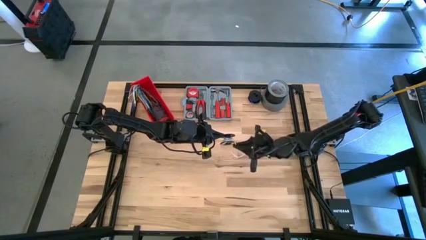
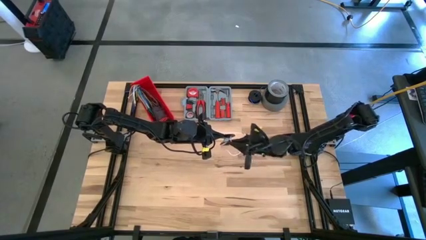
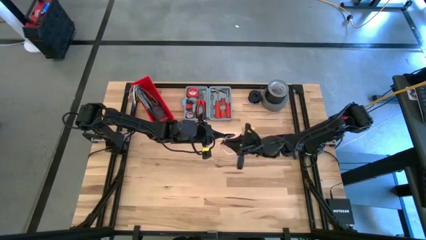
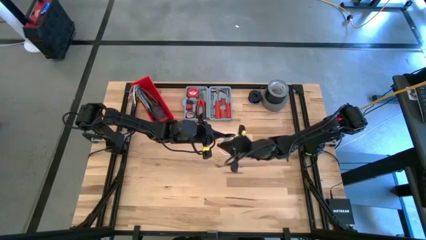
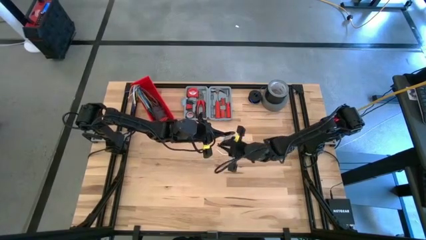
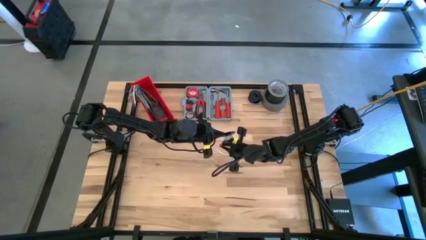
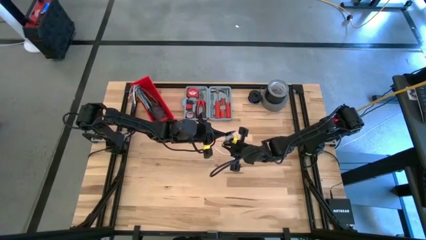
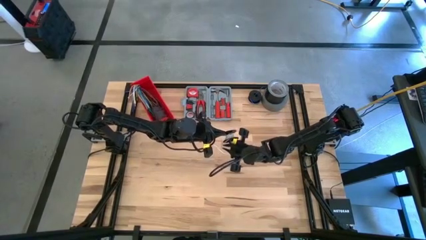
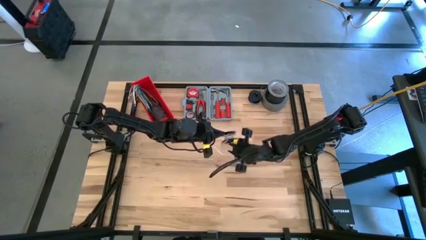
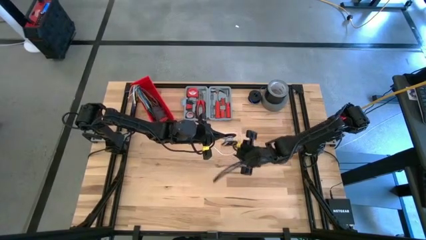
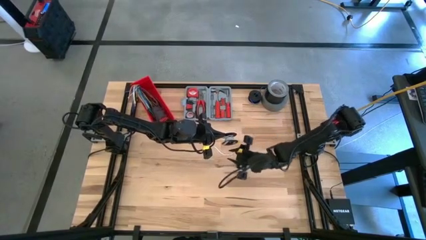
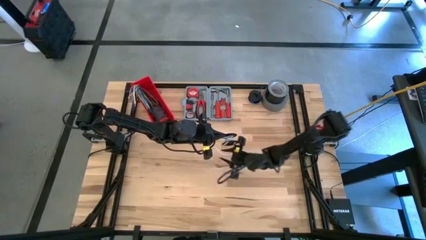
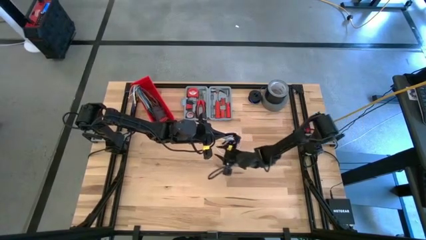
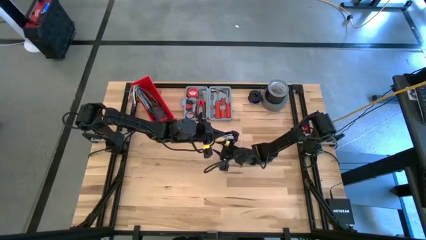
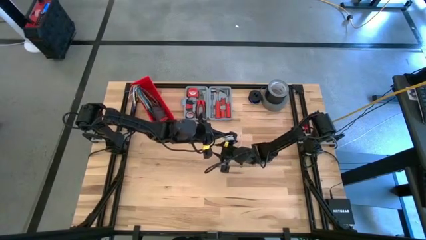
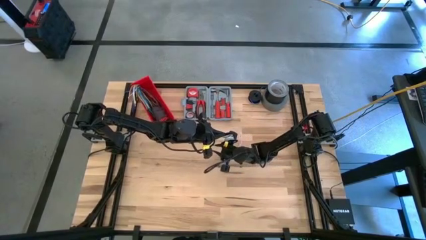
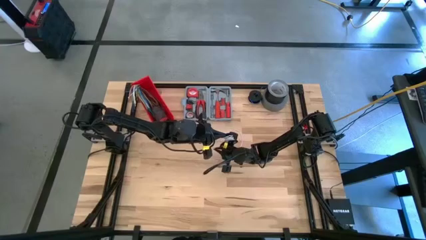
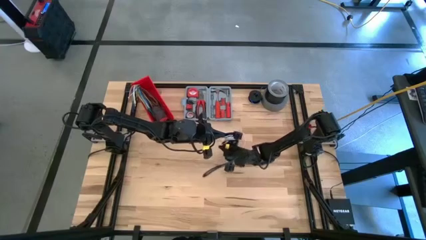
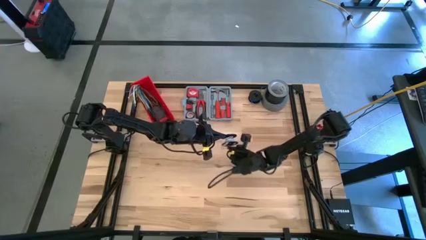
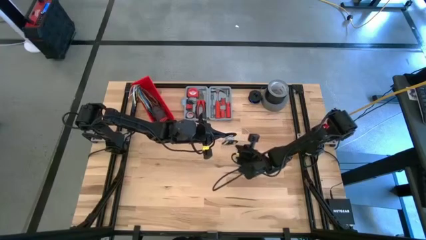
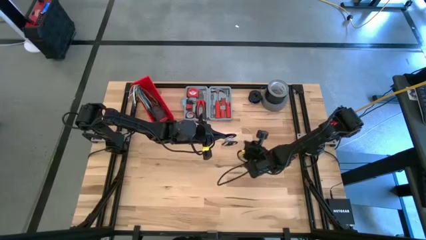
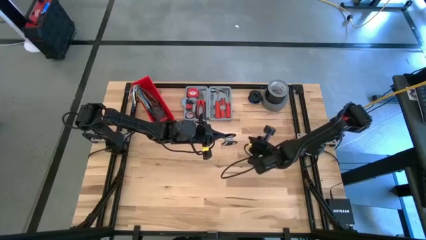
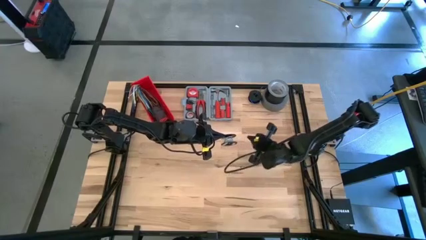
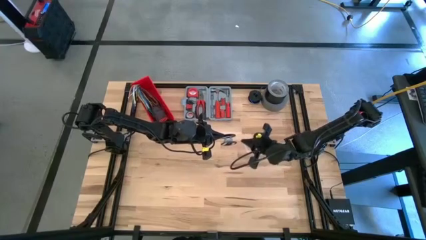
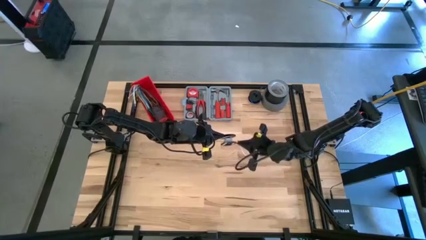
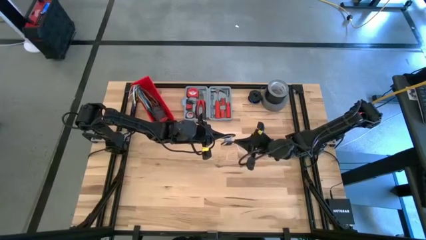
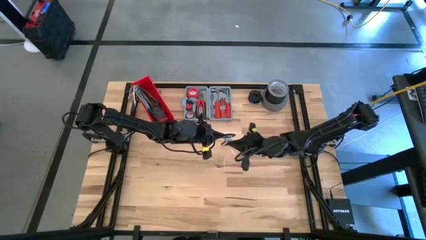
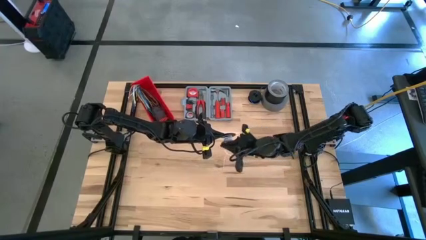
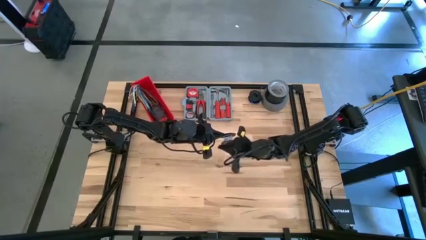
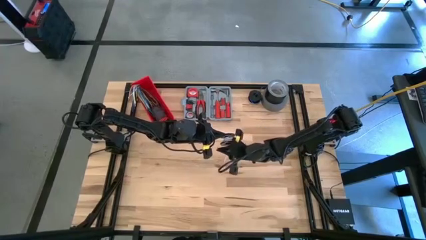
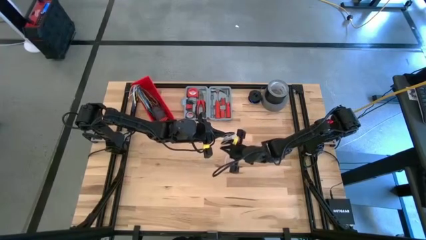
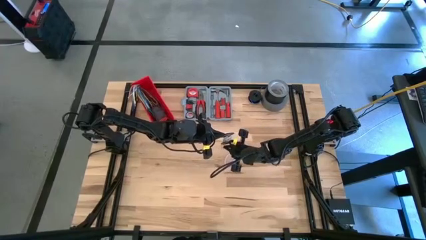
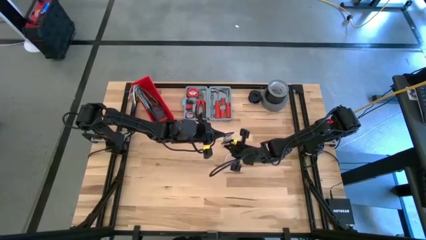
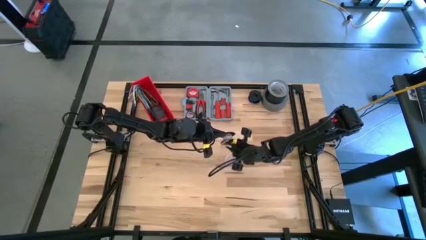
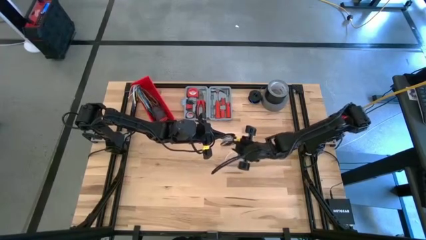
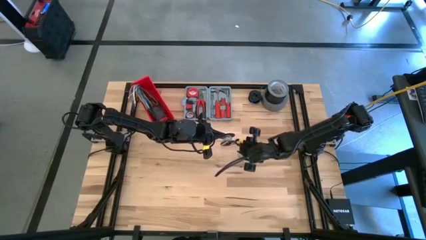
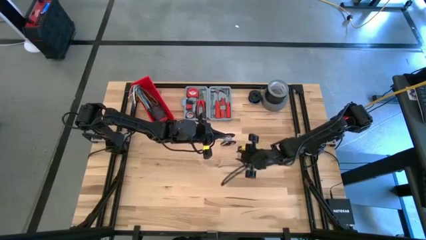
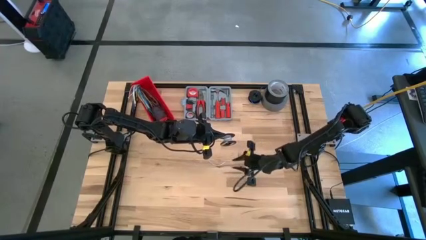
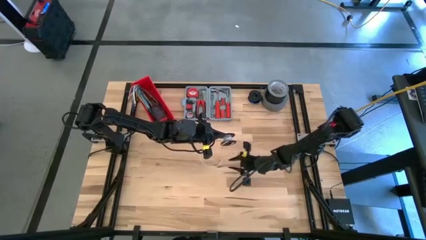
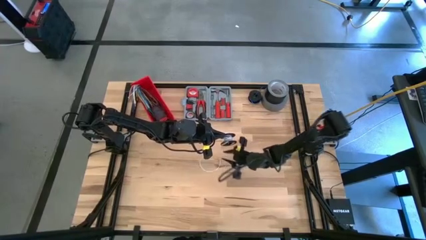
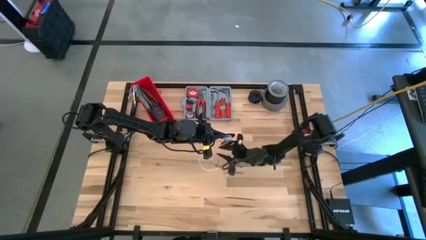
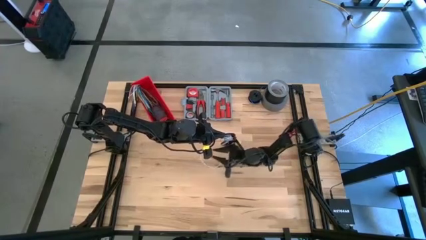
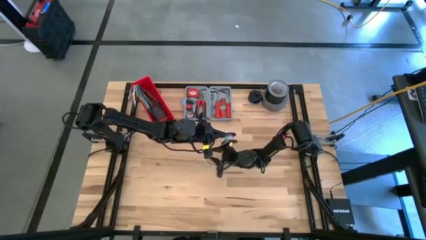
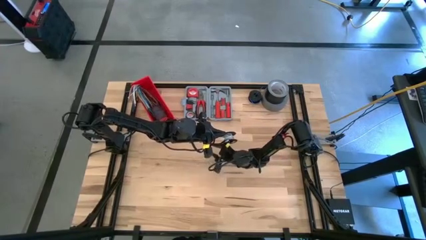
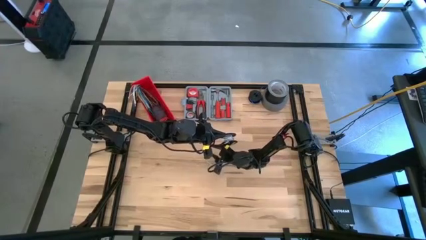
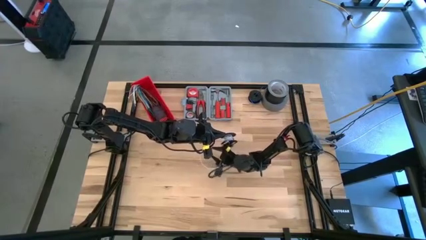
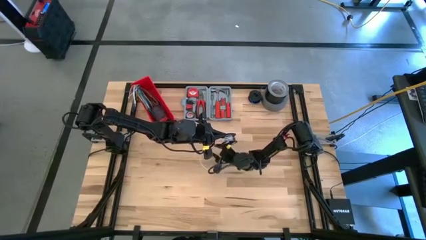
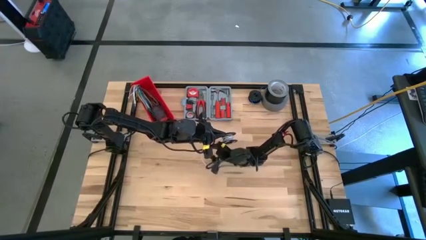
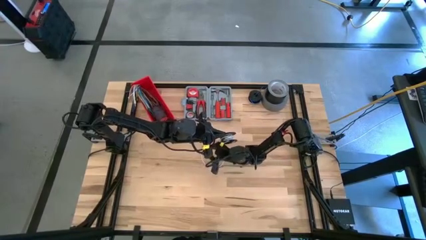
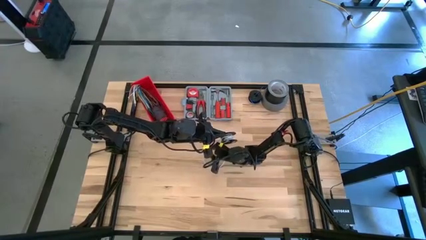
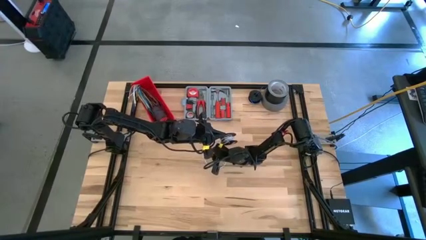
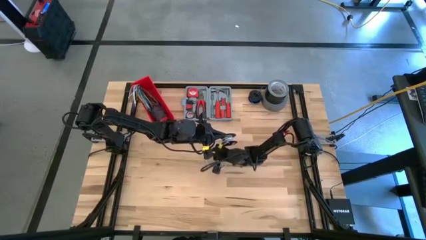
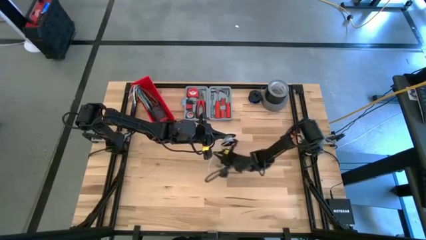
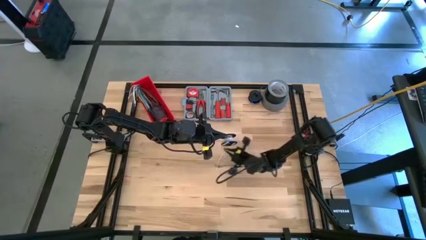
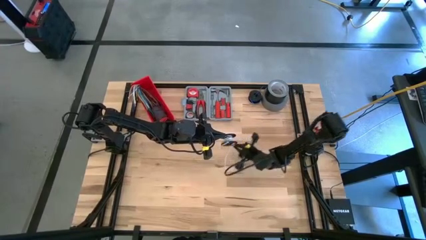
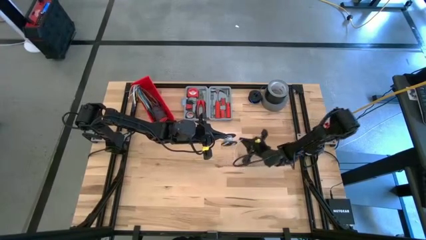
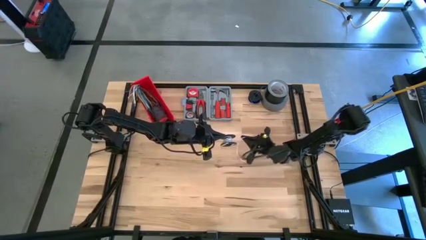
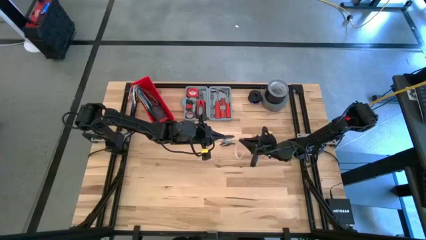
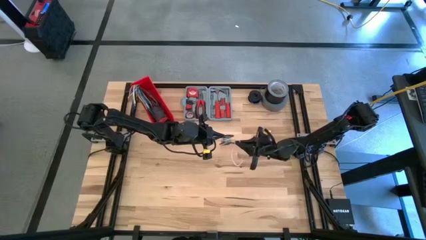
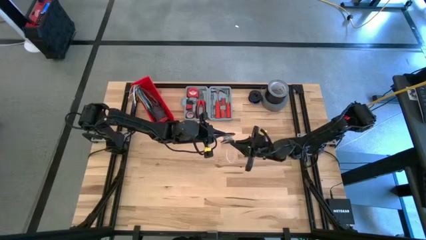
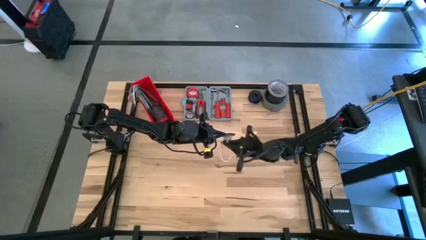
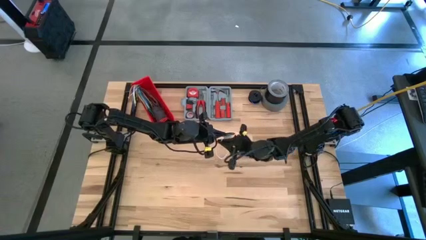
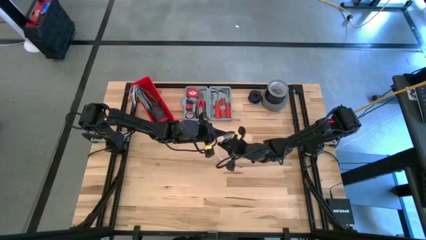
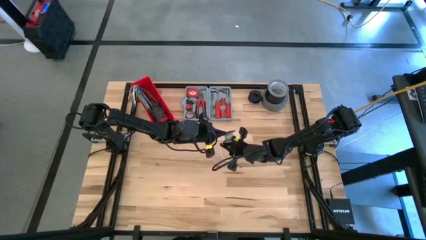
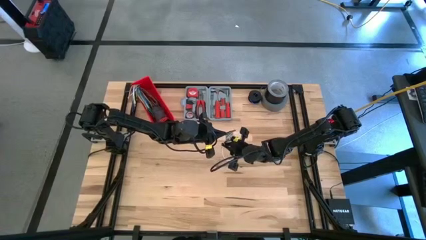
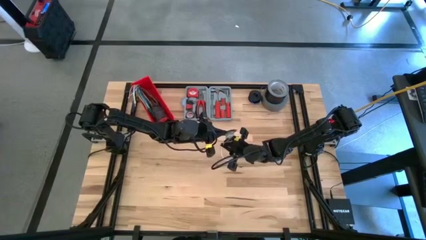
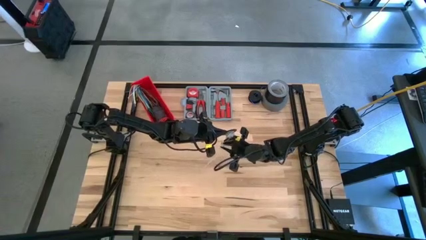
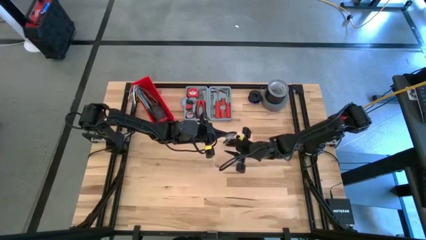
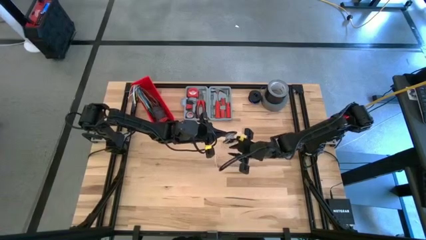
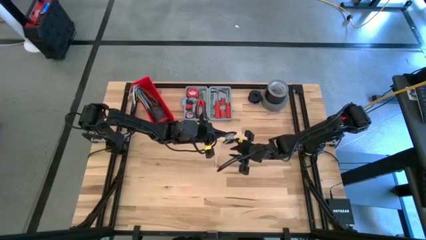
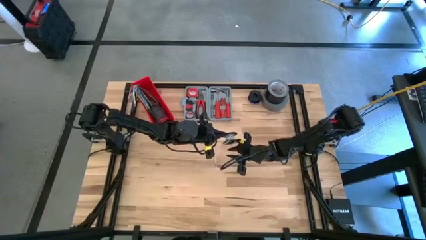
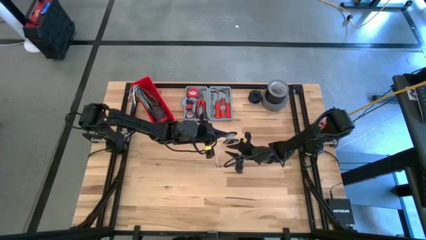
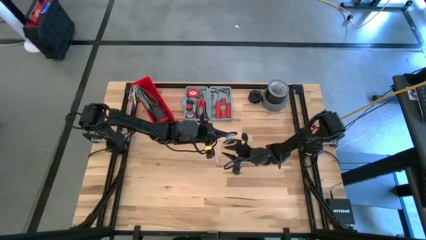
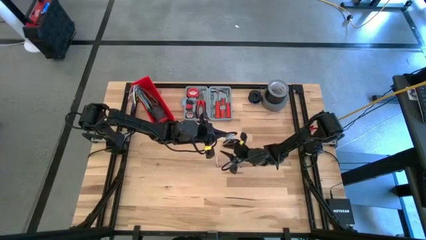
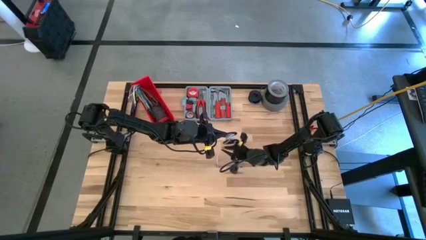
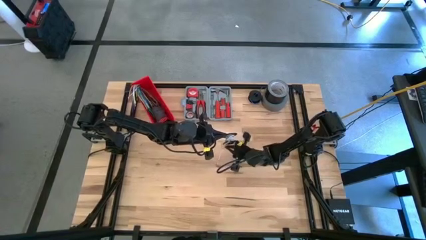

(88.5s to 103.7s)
Task: Coil cords
Coil the white wire into the spool

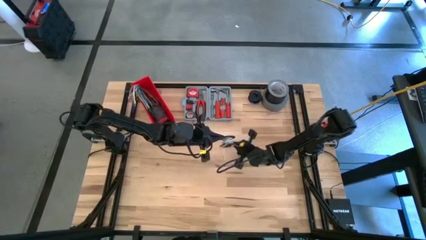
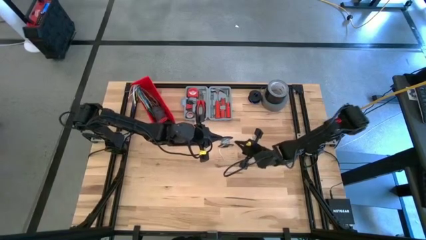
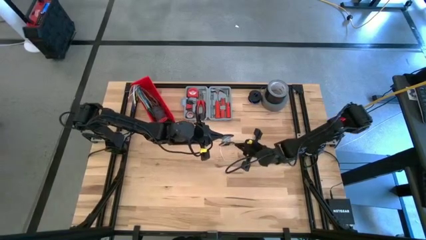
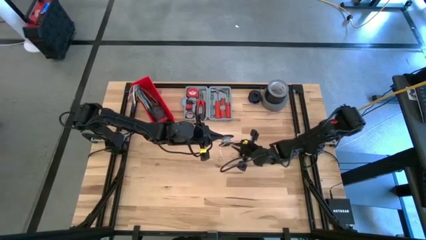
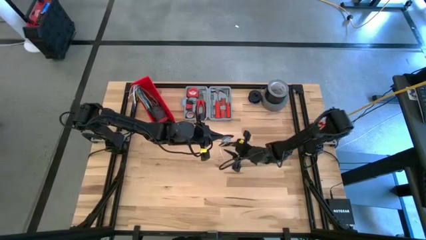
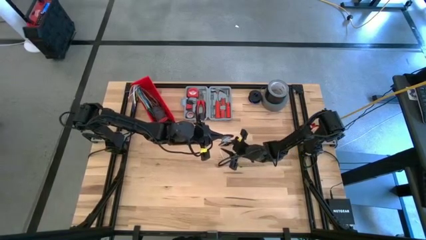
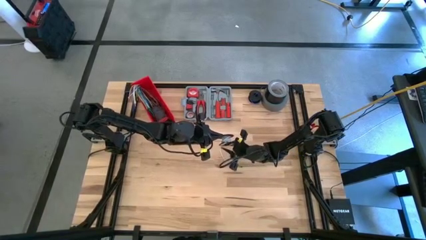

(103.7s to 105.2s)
Coil the white wire into the spool
